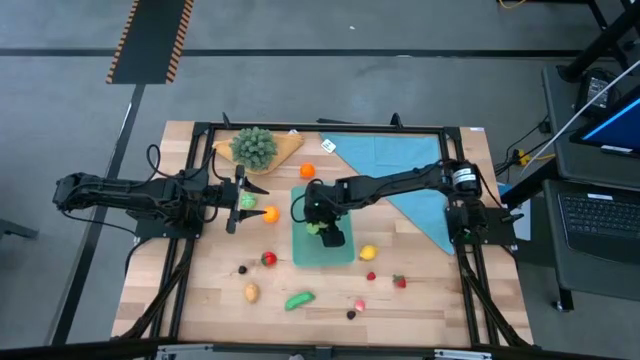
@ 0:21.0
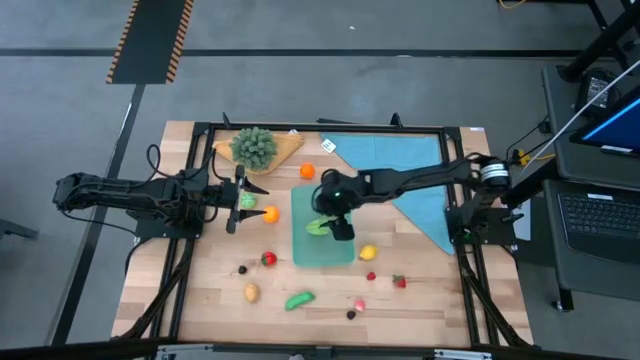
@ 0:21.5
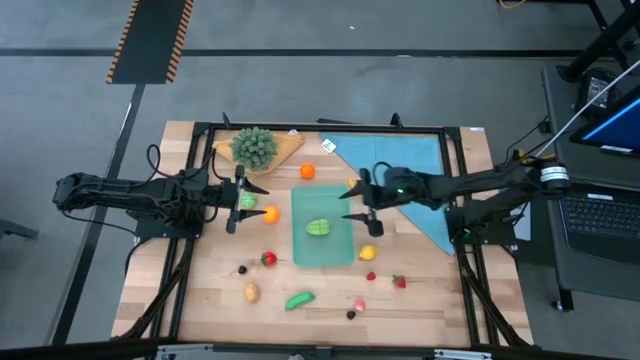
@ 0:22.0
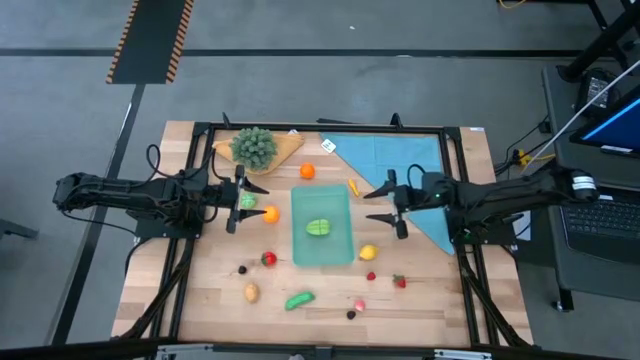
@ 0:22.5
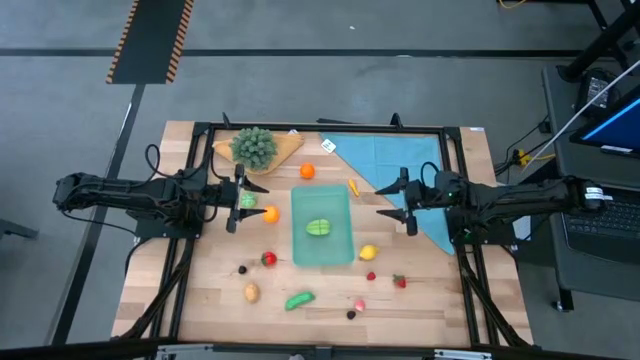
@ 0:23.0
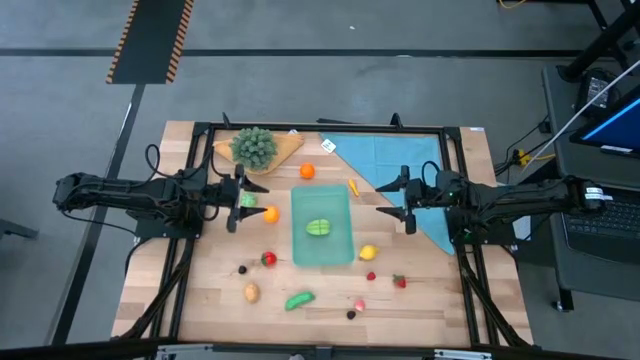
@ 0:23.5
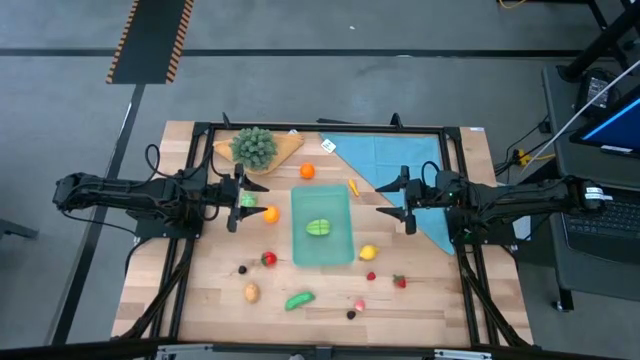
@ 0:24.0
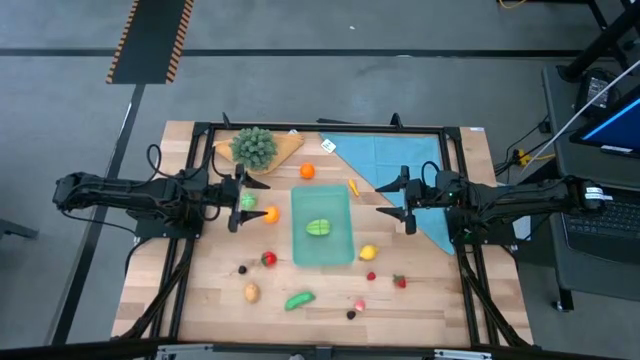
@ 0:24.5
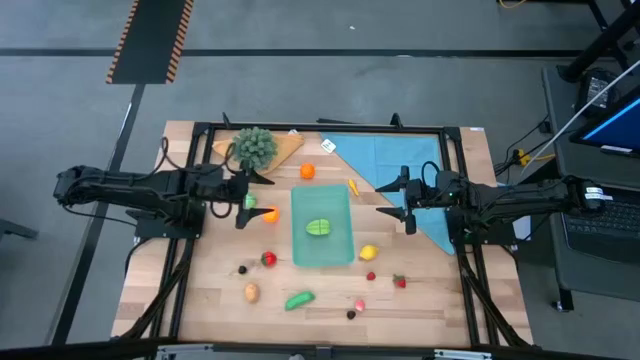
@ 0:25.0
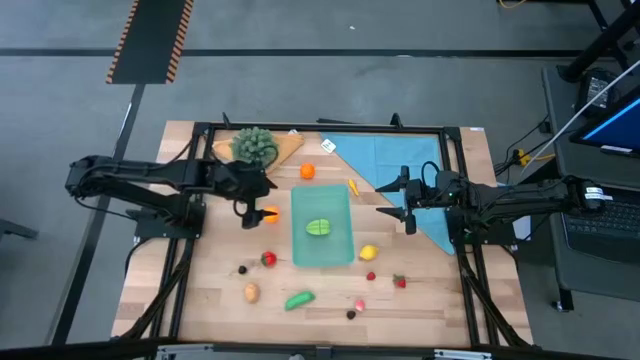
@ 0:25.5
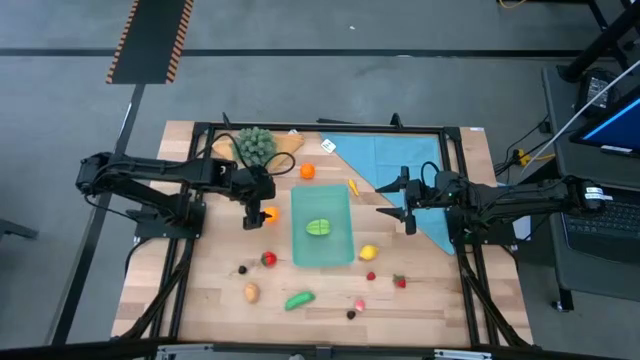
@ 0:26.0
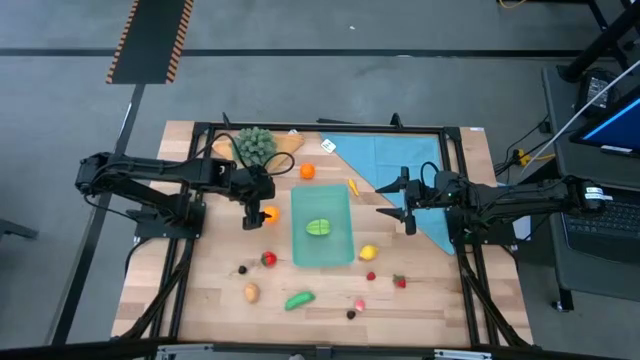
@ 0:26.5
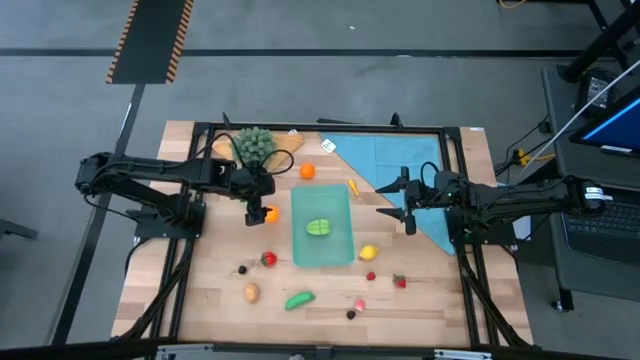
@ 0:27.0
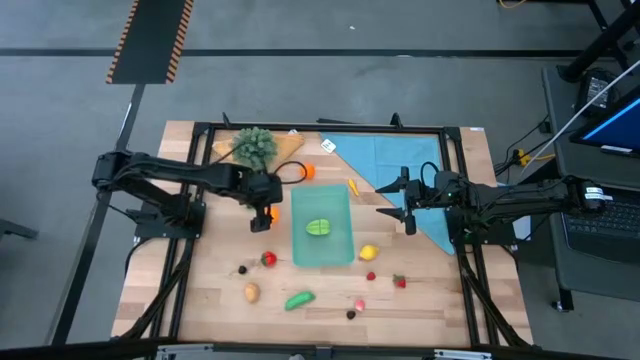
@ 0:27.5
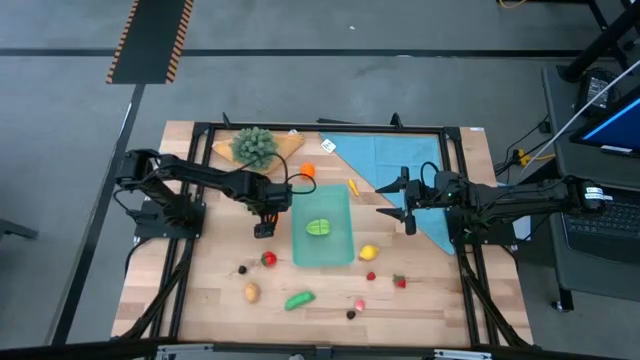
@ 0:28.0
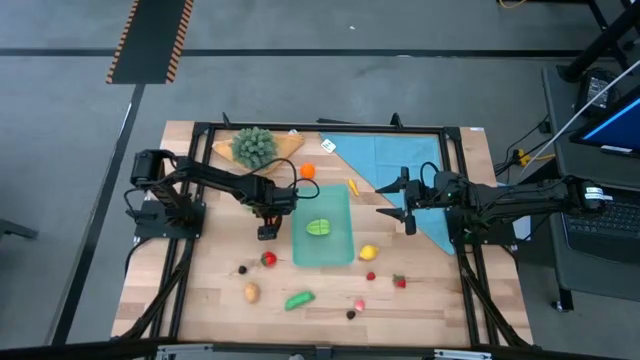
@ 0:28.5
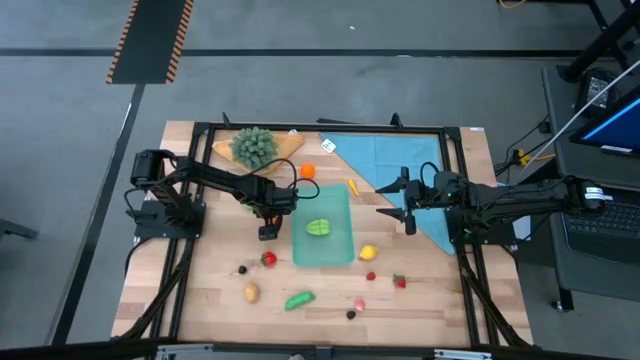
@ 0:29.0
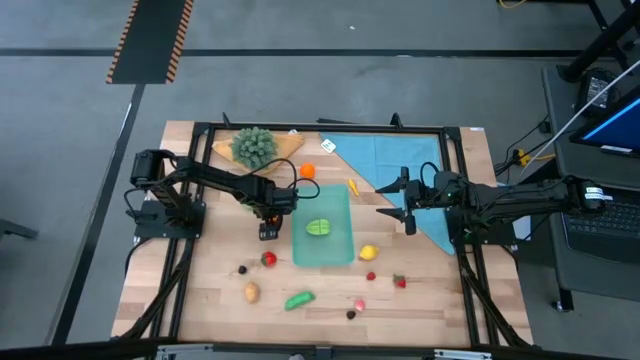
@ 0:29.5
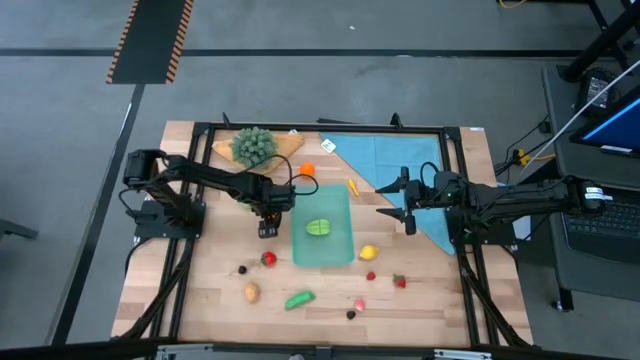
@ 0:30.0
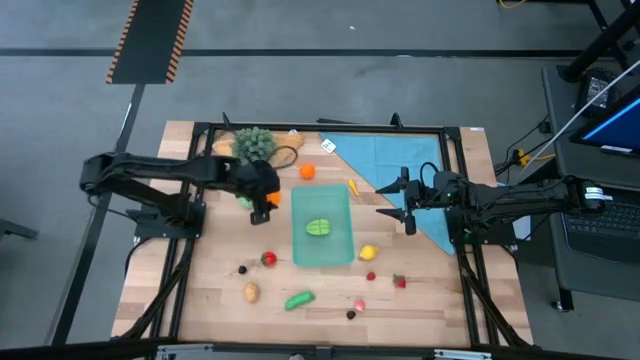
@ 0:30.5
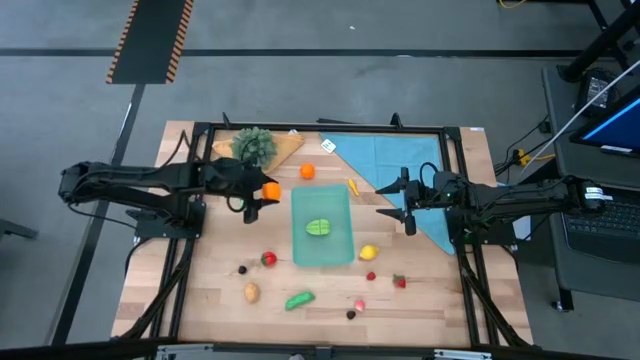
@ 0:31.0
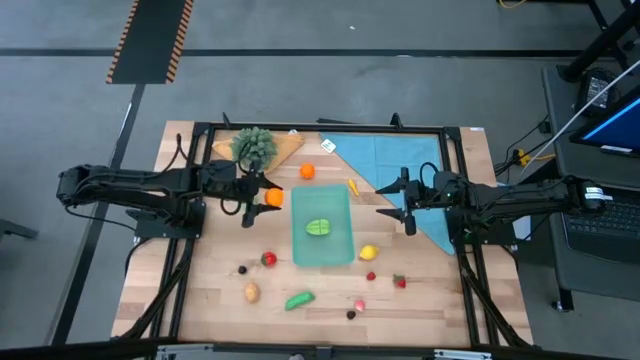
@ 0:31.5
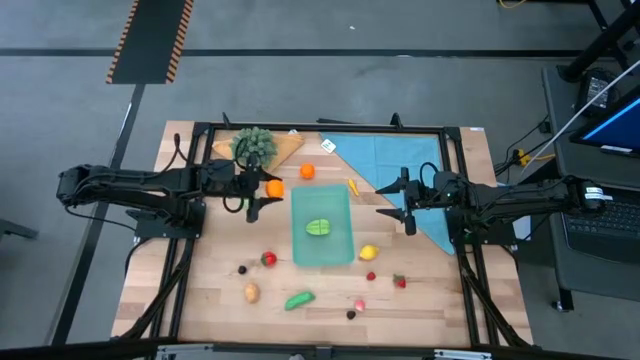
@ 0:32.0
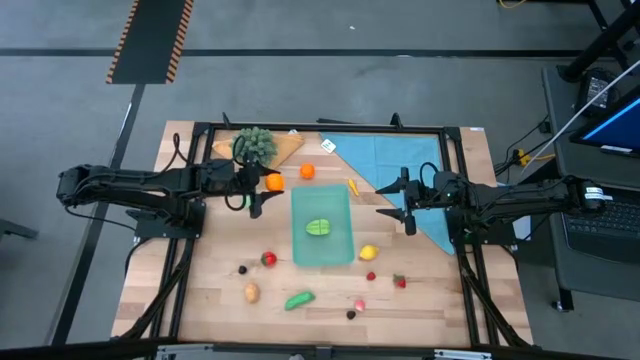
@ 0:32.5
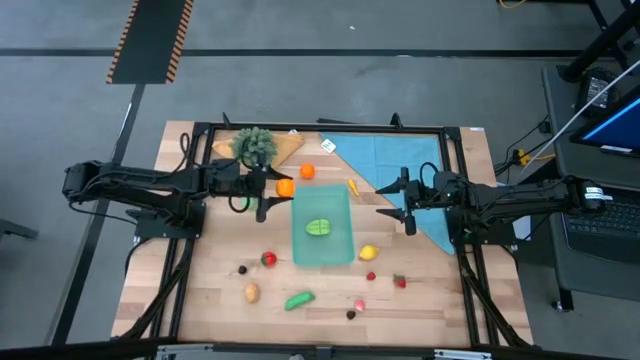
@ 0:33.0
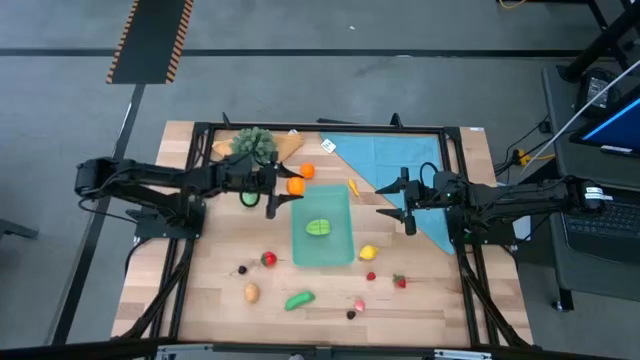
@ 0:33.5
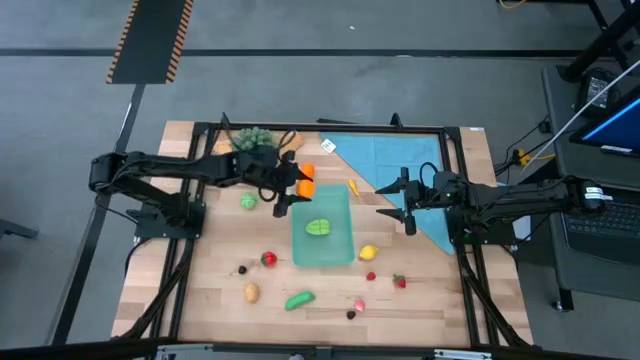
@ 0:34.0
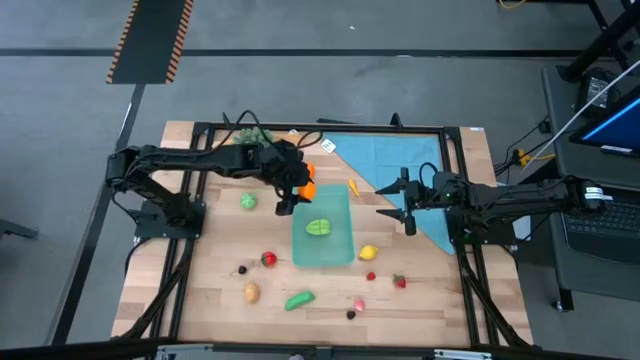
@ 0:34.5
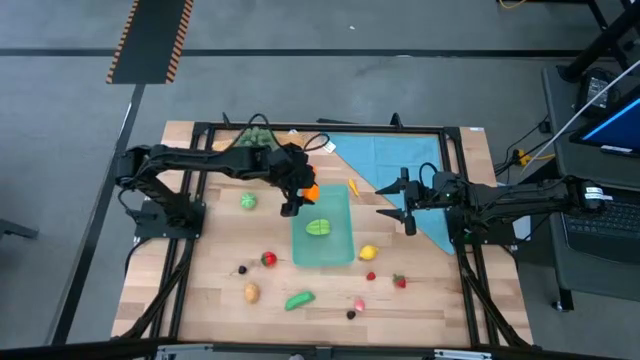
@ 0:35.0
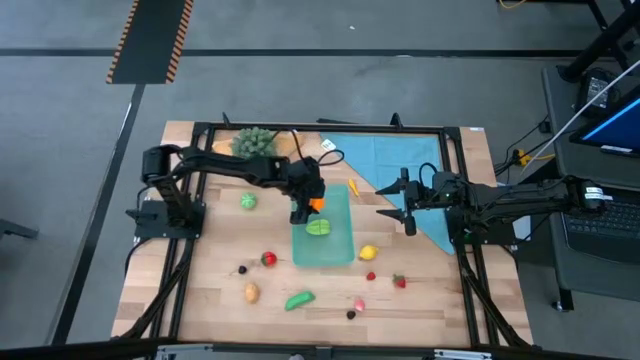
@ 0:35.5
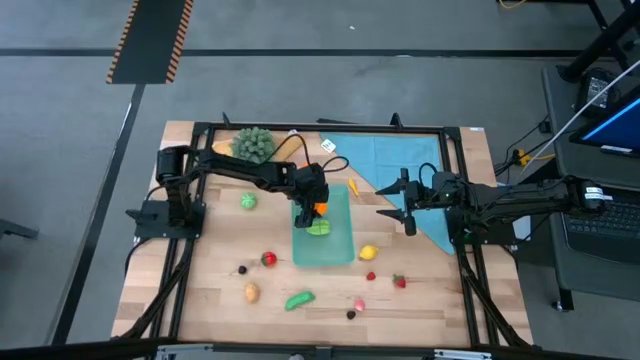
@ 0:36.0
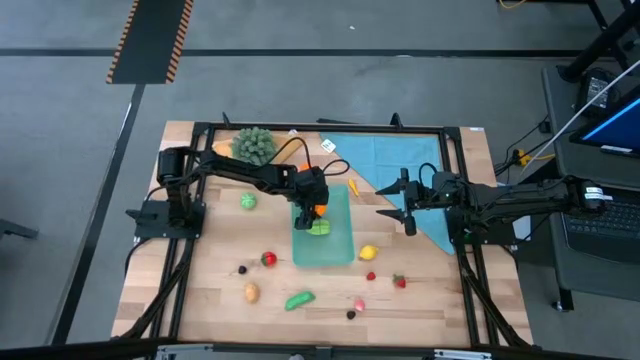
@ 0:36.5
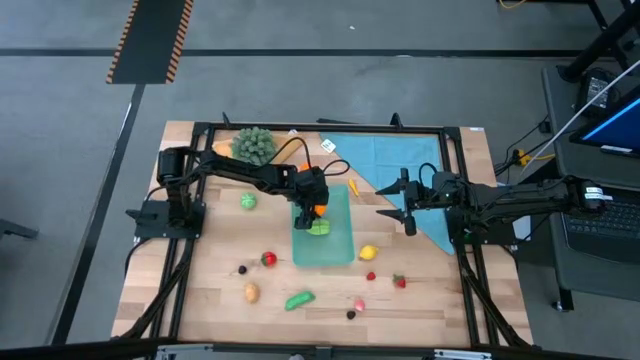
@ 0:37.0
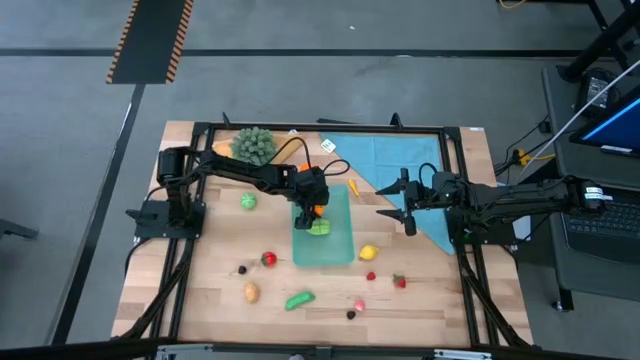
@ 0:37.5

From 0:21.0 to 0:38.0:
Task: Pick and placing Produce into tupperware
Put the orange into the bin

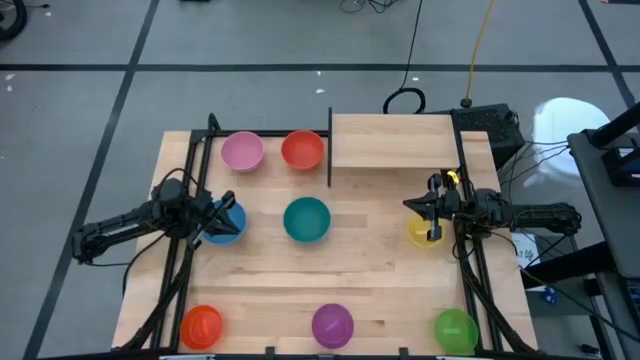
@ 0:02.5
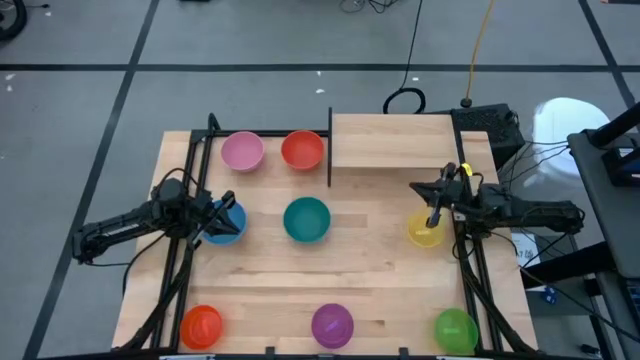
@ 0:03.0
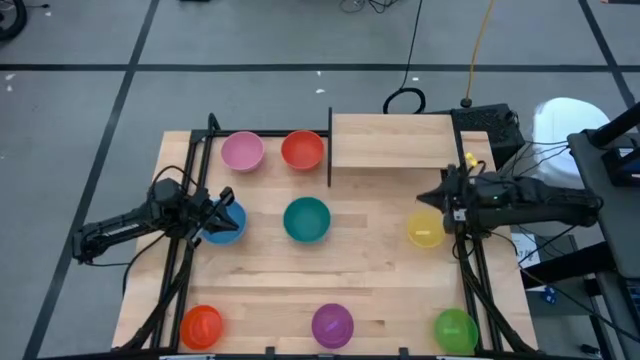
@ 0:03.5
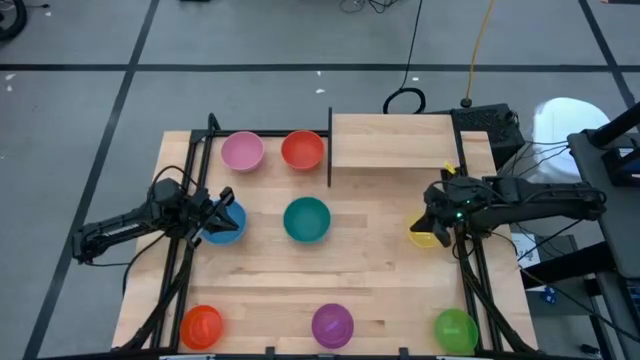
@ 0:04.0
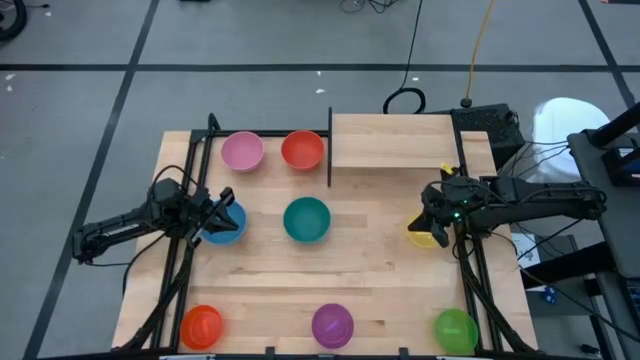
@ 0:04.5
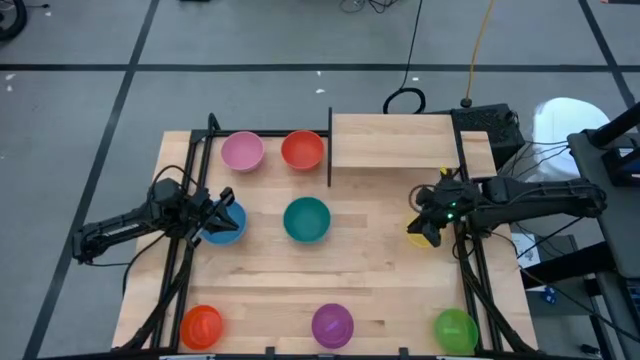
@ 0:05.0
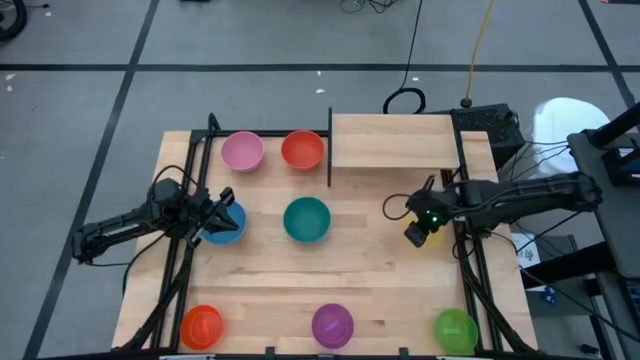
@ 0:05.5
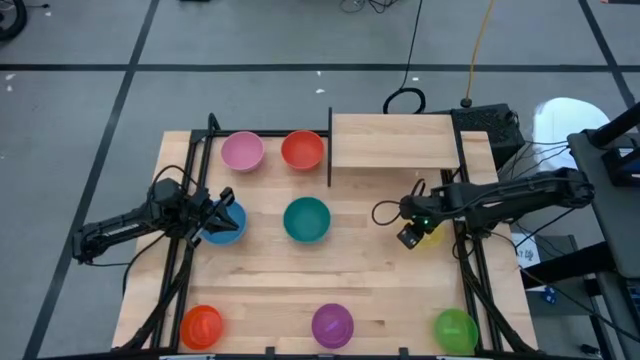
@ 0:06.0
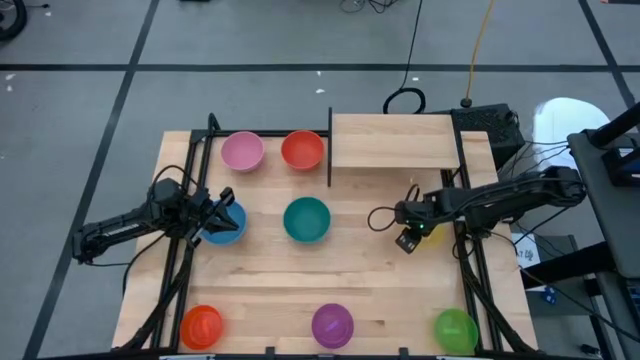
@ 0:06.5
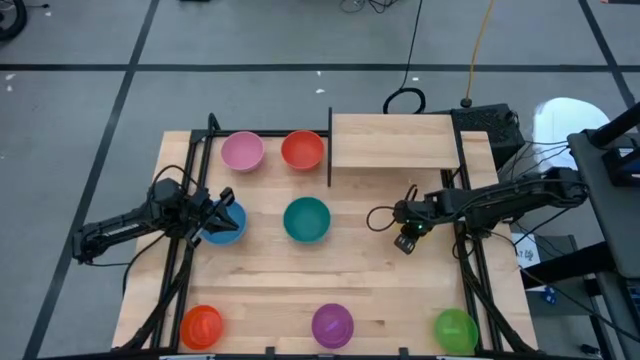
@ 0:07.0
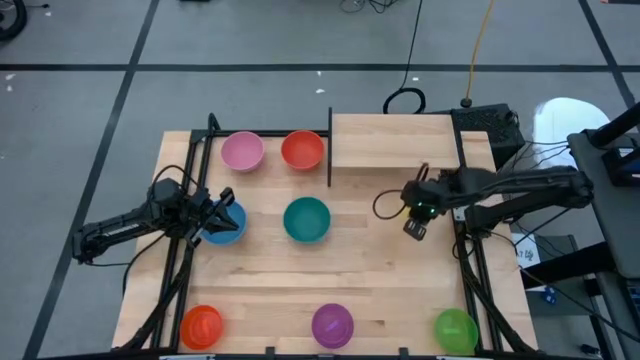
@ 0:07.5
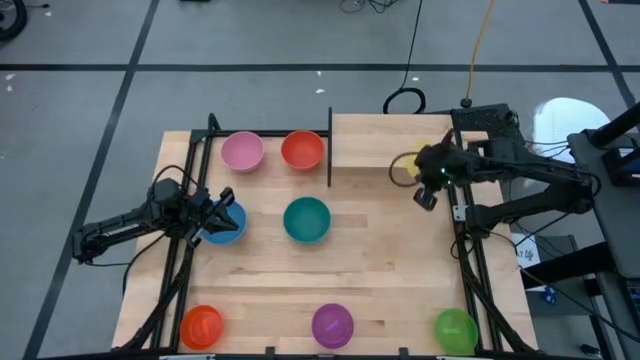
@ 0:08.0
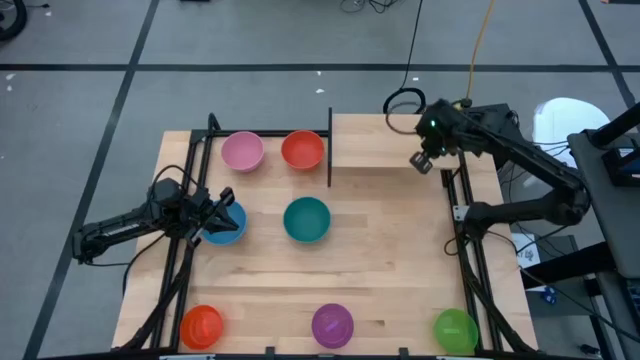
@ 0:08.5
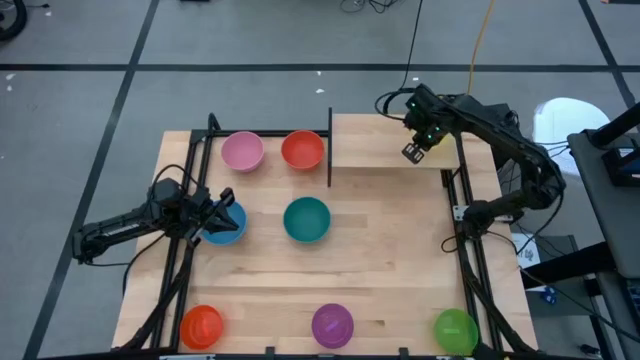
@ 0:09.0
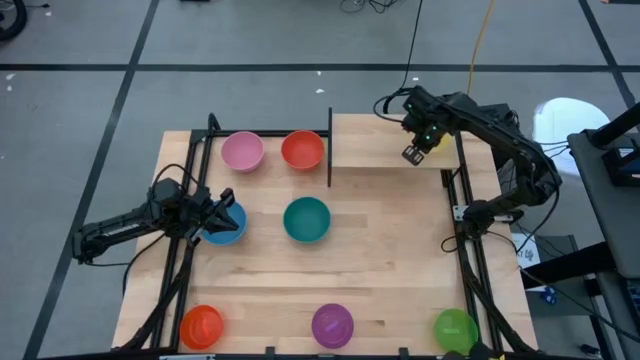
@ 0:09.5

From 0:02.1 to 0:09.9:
Task: Place and stack bowls onto a shelf
Put the yellow bowl on the shelf
